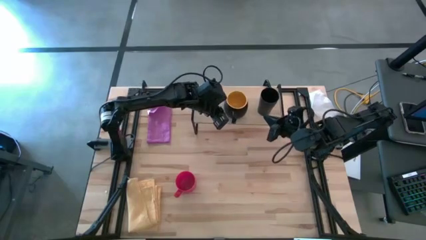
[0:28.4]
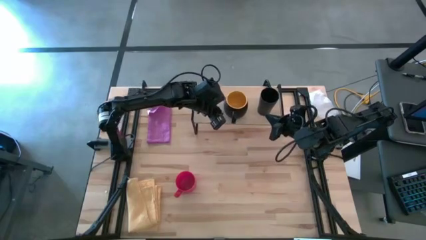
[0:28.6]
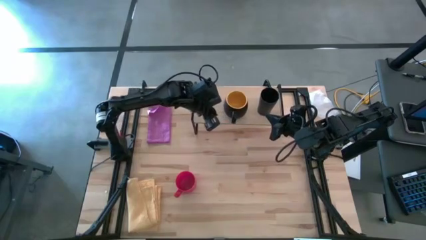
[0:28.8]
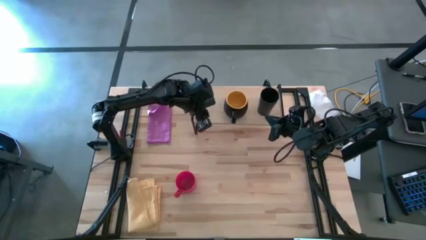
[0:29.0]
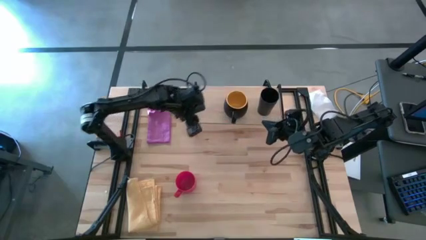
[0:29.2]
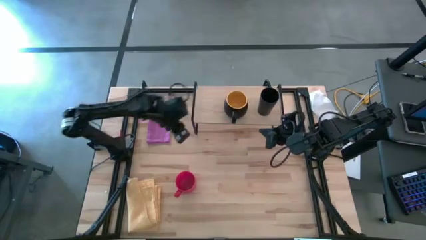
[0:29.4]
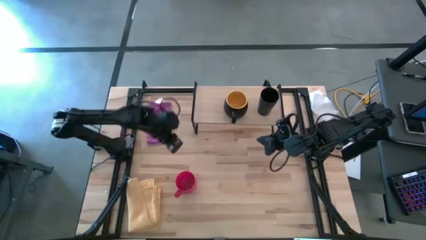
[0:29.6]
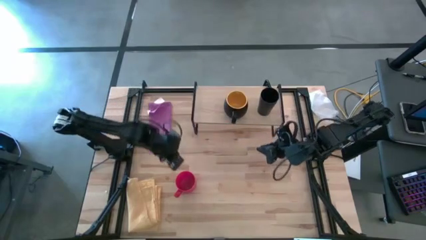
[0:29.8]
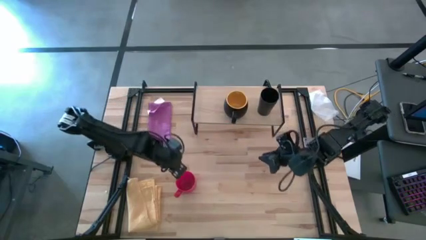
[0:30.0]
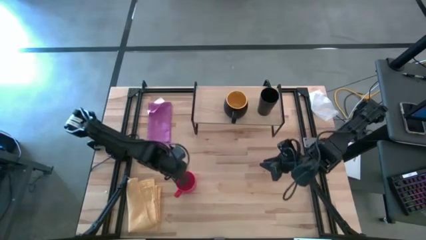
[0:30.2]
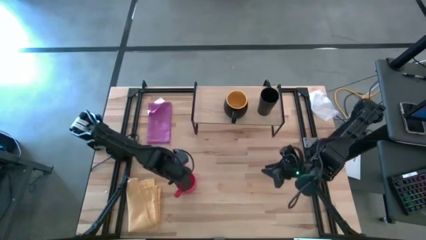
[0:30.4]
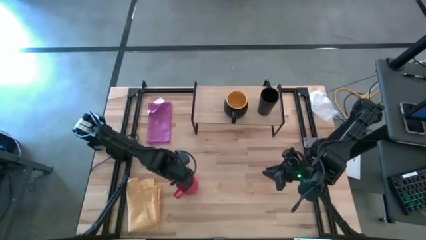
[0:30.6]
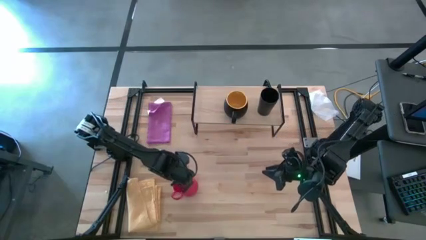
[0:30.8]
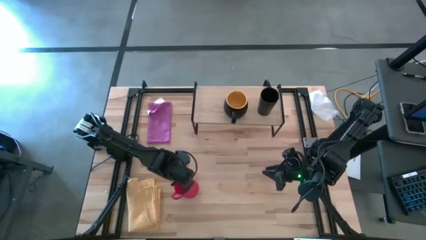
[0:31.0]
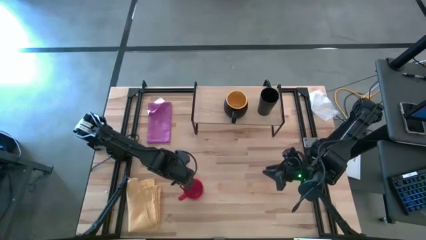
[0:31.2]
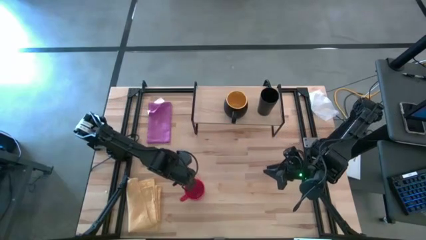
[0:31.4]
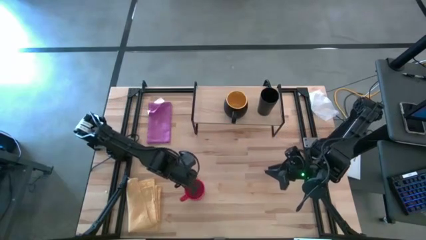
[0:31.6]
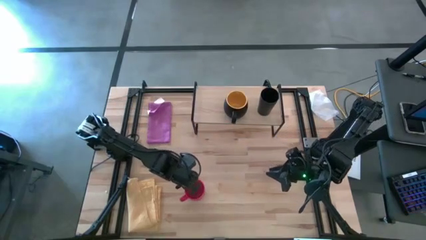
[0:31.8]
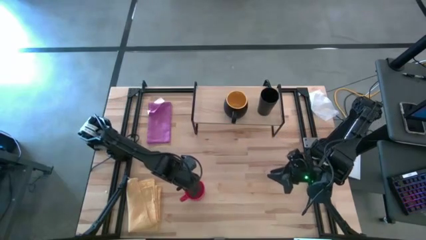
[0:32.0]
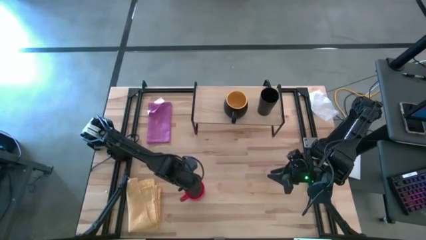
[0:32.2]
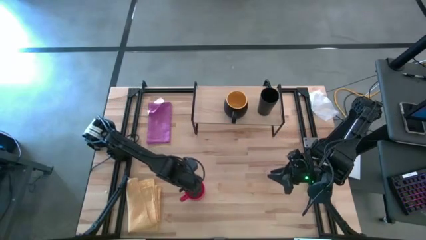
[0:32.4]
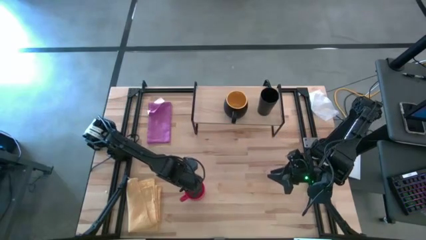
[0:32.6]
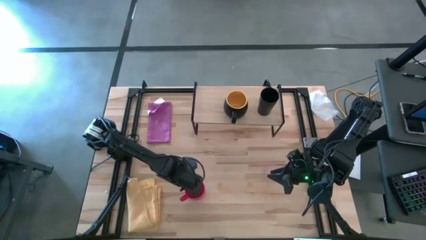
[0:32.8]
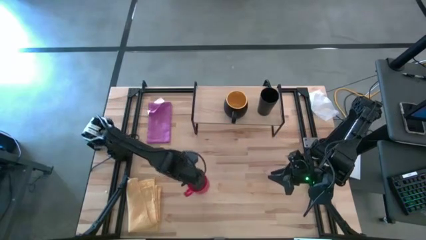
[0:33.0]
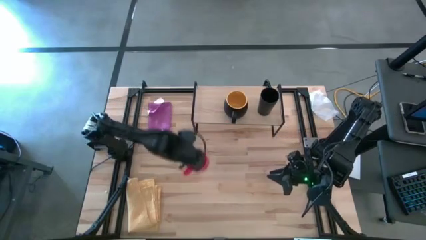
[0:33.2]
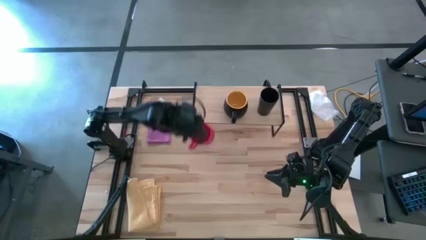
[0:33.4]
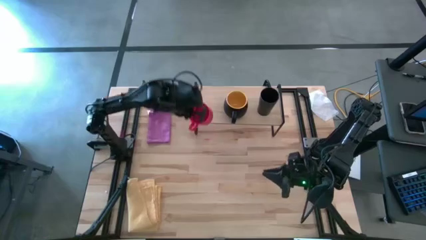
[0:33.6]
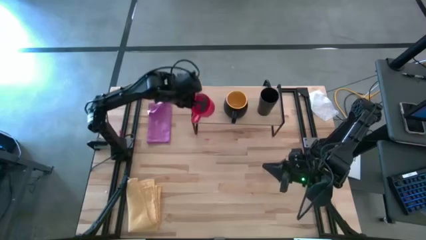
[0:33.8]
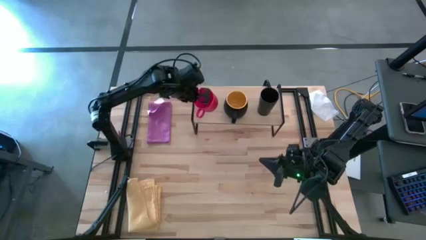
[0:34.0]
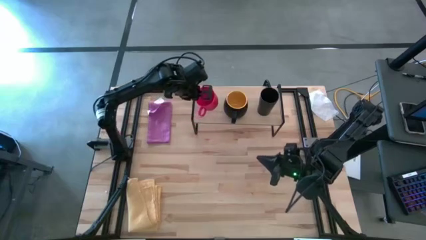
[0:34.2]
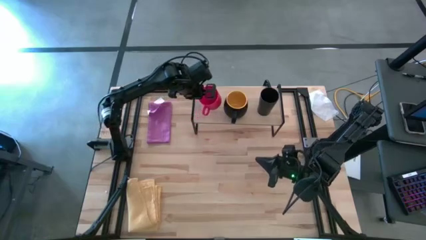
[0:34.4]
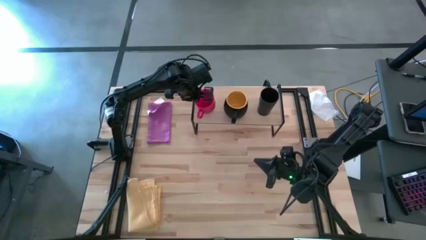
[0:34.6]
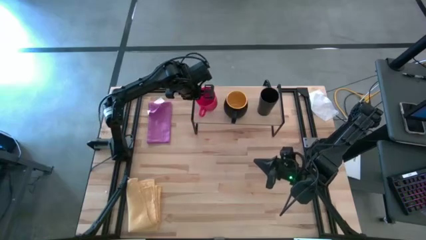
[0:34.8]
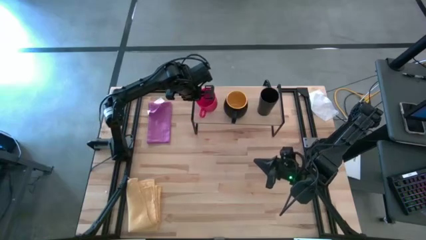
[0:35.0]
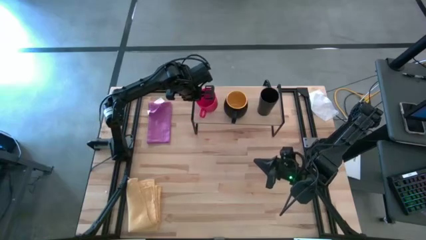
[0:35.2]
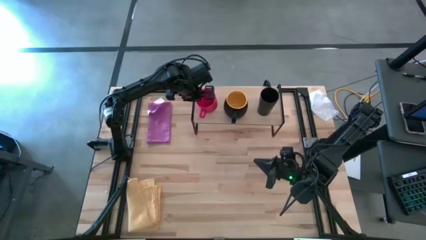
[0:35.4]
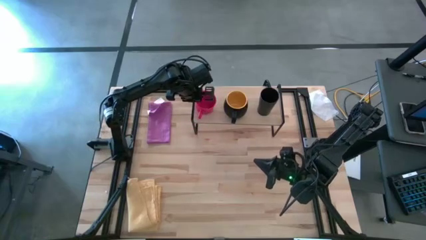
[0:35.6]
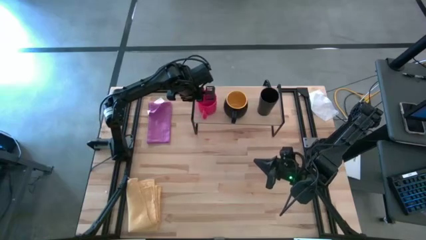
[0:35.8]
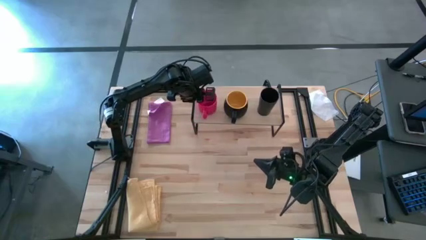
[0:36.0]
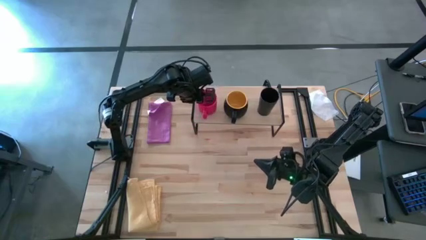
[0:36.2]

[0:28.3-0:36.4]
Task: Stack small to large cups/mugs on shelf
Put the red mug on the shelf

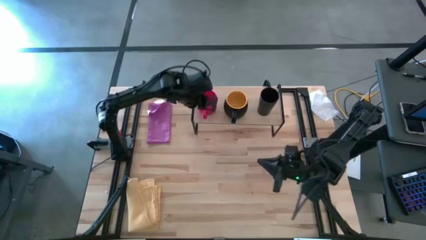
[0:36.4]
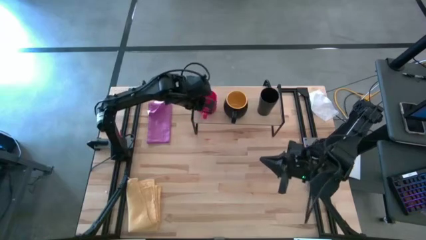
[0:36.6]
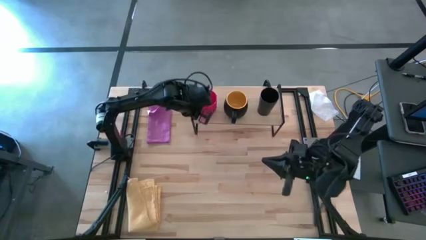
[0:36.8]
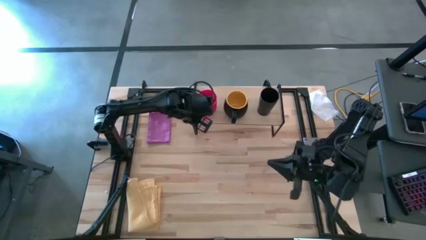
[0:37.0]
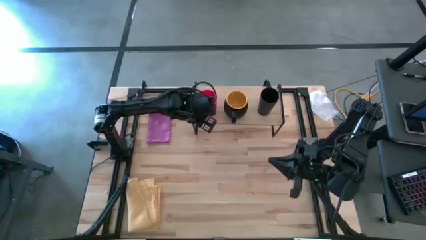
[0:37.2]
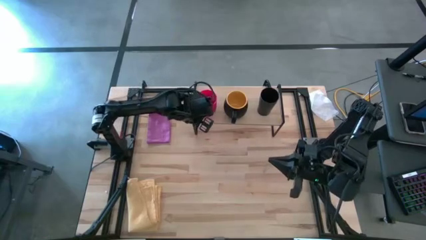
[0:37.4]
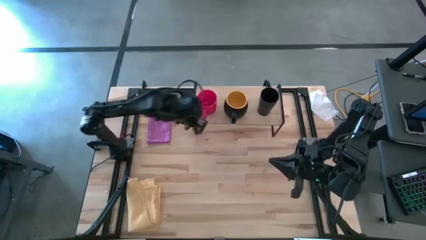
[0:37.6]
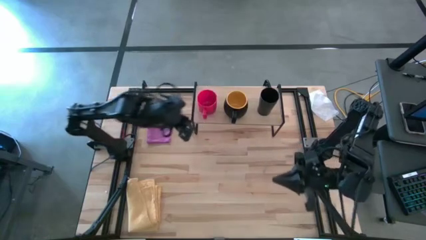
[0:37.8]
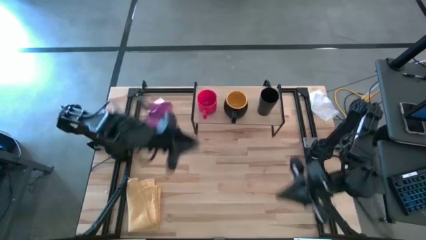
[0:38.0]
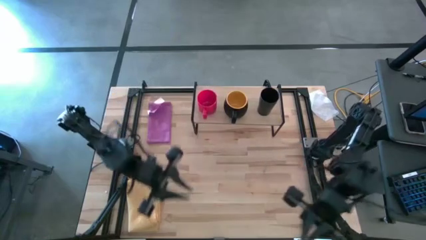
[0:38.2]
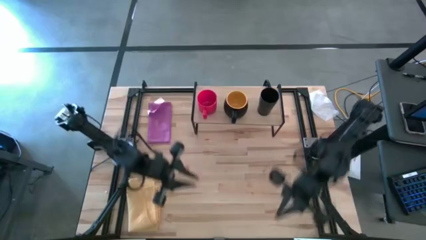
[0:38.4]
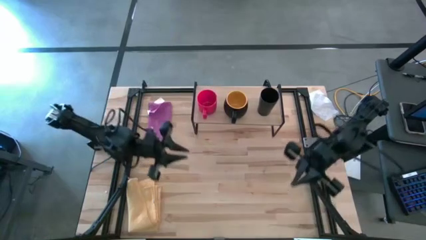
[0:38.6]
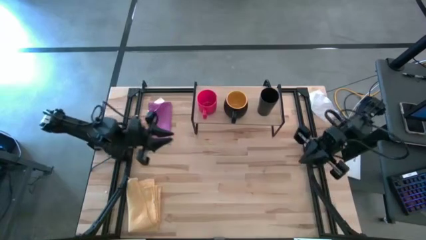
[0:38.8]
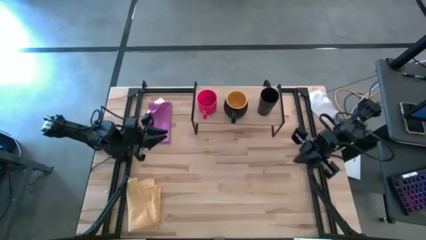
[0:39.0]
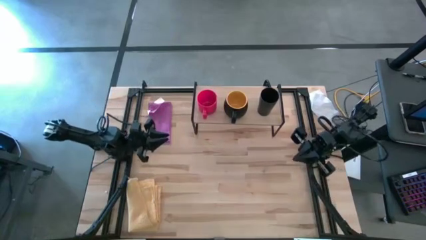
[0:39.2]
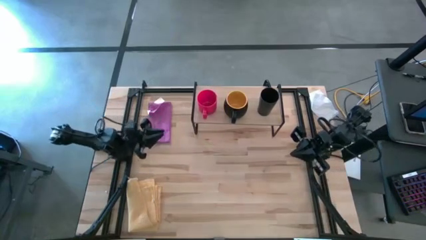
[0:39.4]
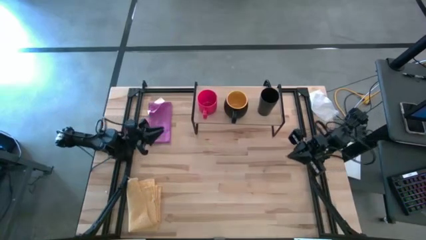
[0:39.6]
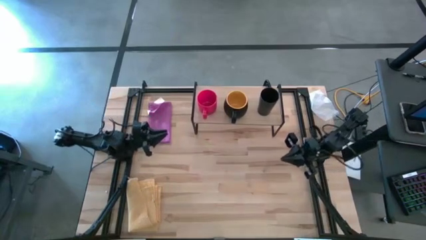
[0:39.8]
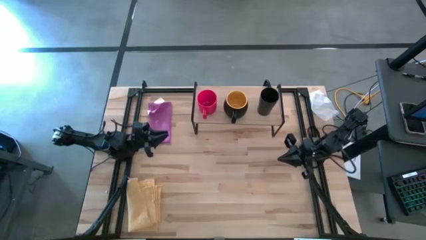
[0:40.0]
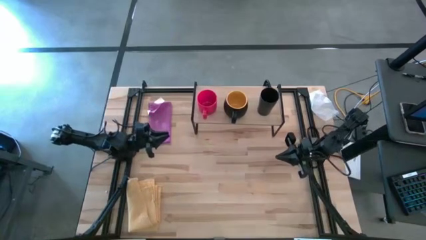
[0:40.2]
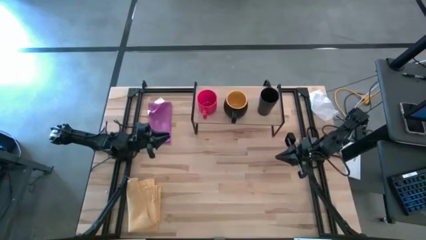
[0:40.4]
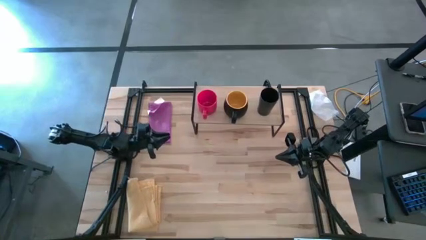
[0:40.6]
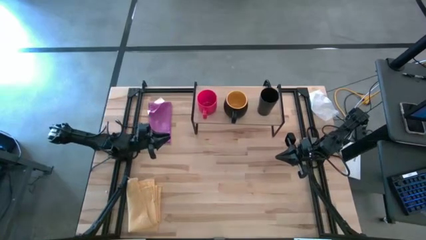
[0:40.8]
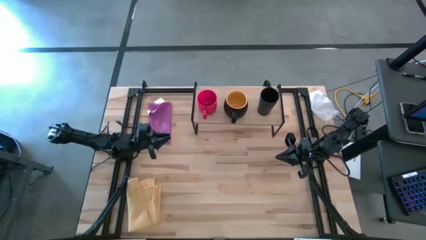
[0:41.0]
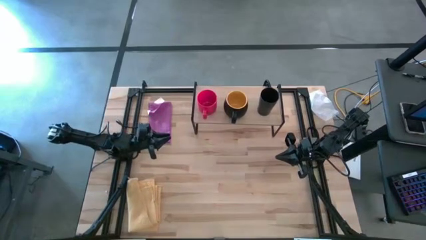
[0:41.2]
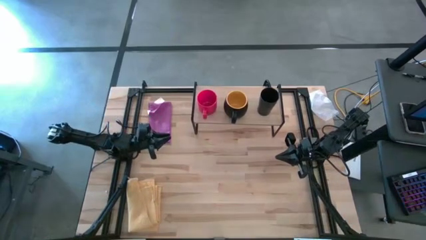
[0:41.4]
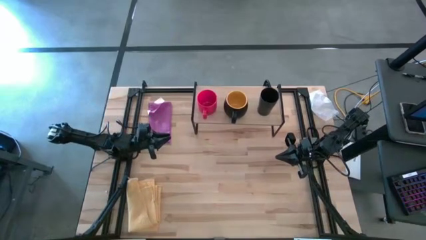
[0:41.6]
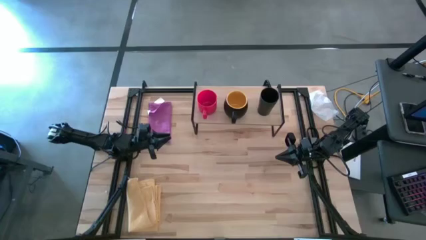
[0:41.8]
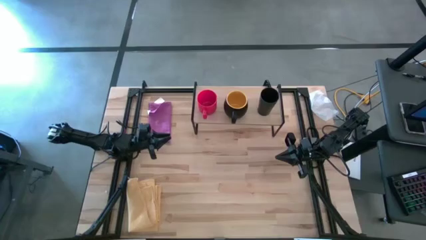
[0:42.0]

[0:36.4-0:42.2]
Return to Home Position
